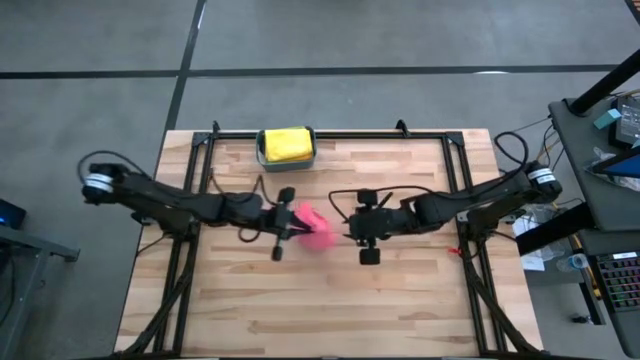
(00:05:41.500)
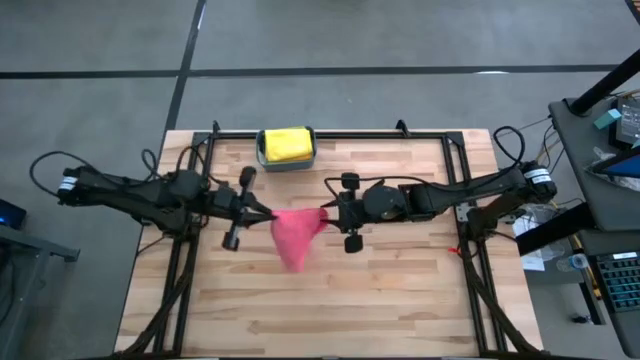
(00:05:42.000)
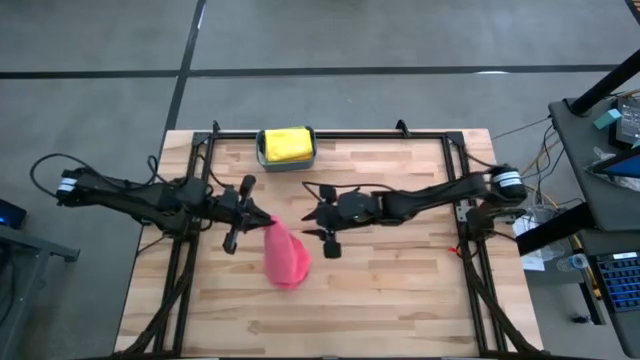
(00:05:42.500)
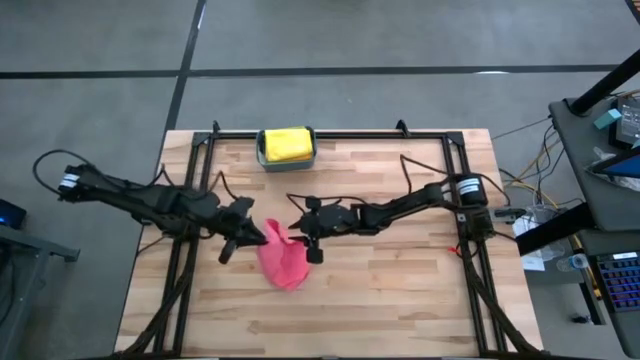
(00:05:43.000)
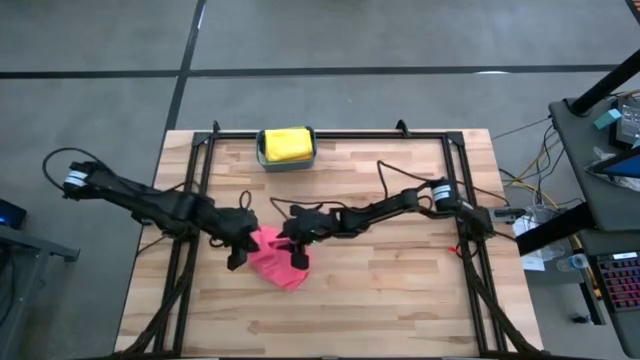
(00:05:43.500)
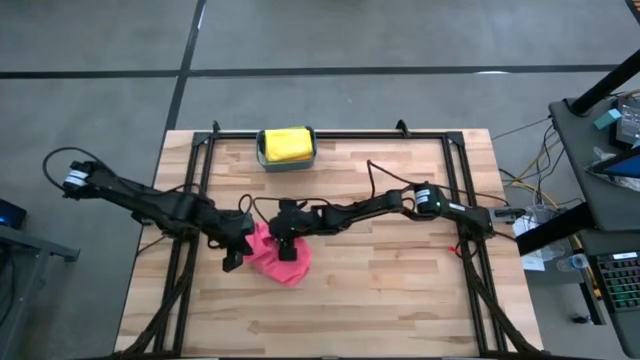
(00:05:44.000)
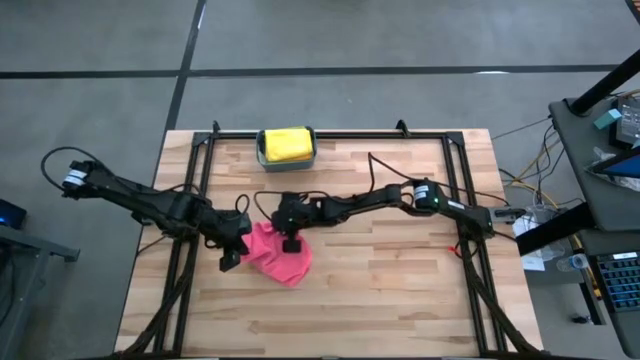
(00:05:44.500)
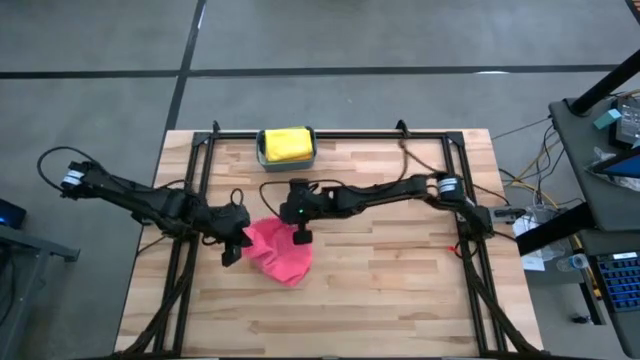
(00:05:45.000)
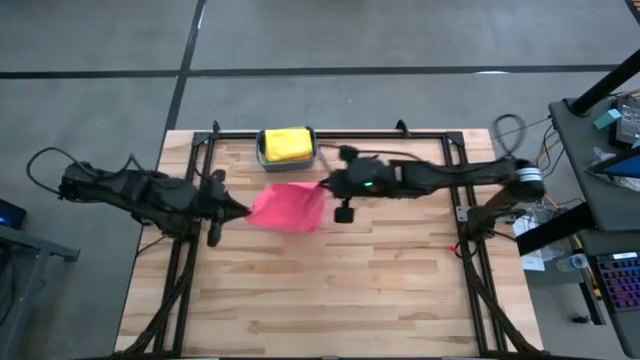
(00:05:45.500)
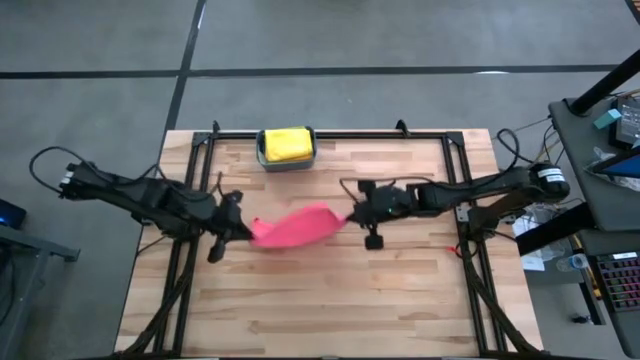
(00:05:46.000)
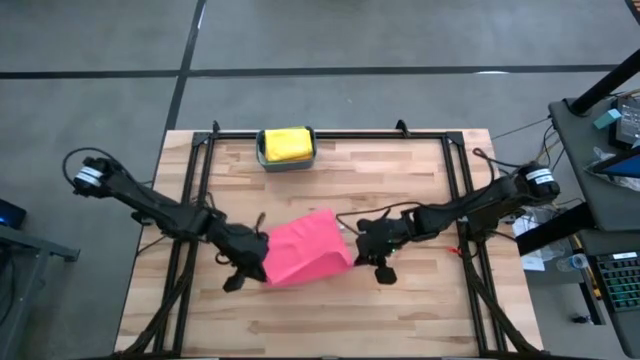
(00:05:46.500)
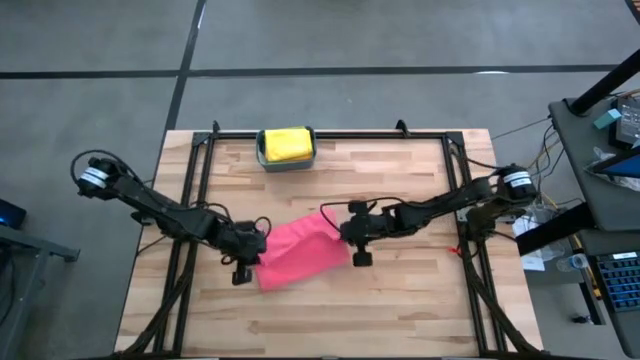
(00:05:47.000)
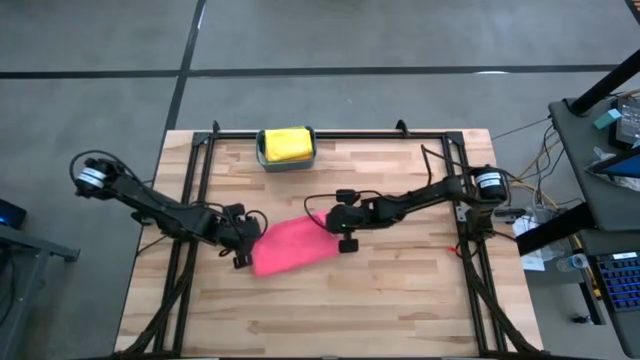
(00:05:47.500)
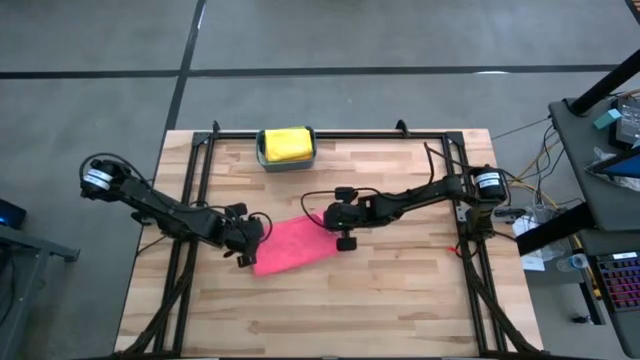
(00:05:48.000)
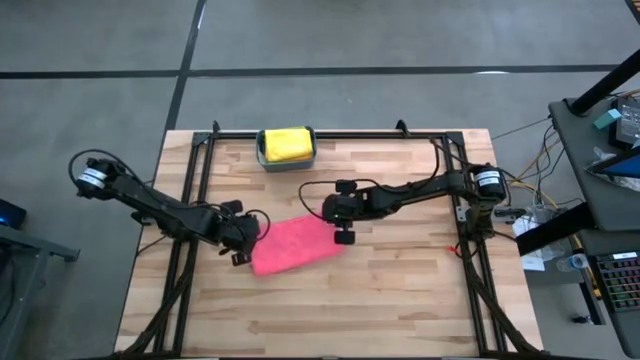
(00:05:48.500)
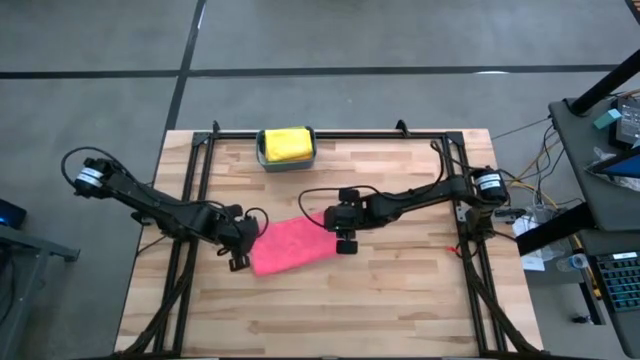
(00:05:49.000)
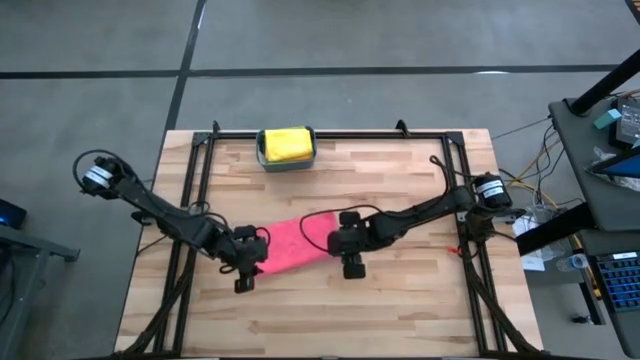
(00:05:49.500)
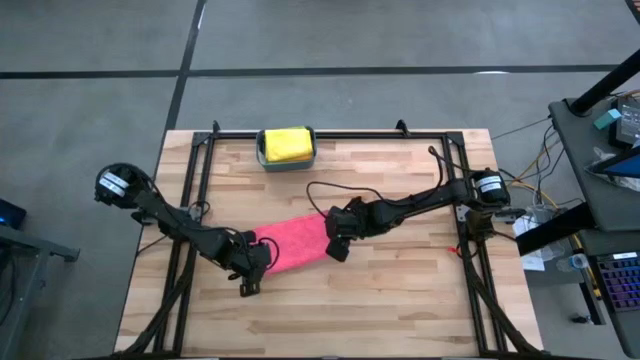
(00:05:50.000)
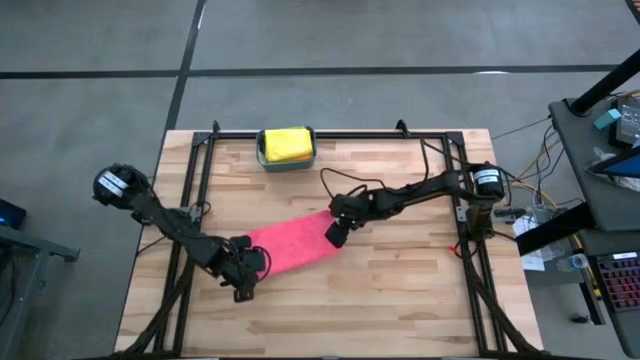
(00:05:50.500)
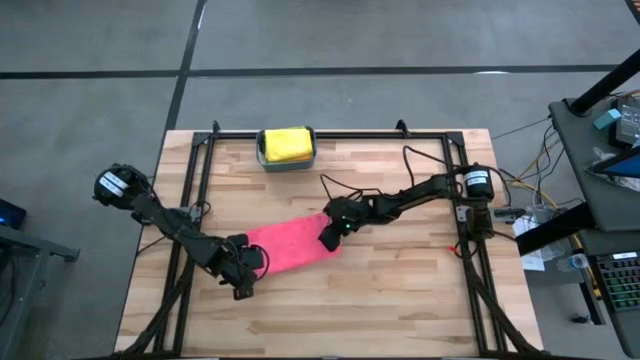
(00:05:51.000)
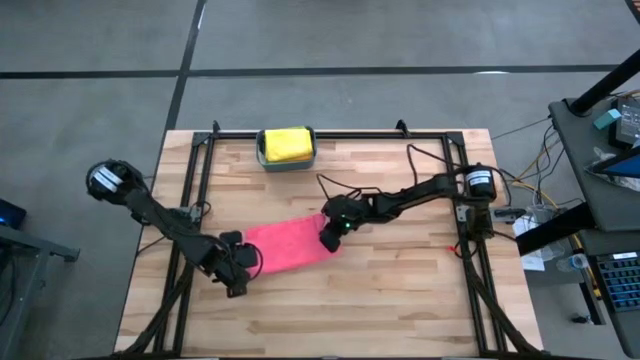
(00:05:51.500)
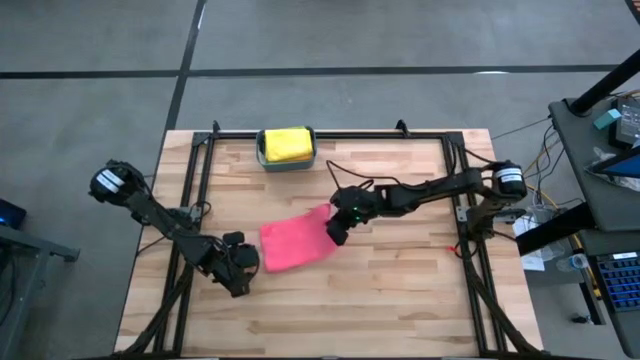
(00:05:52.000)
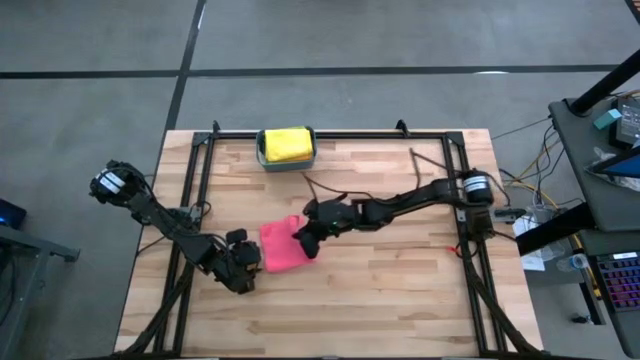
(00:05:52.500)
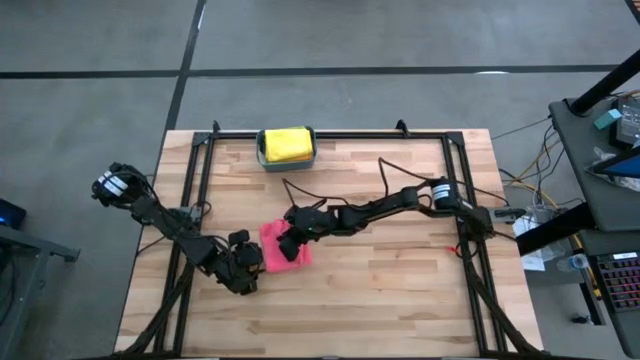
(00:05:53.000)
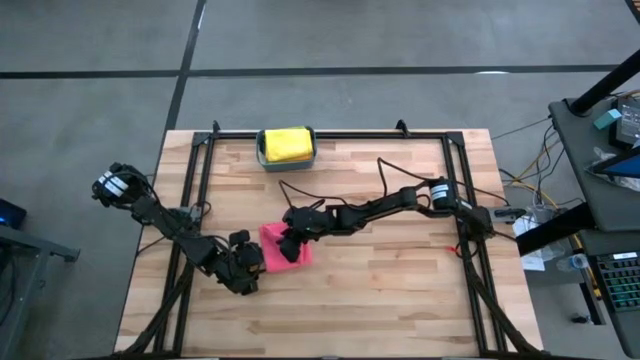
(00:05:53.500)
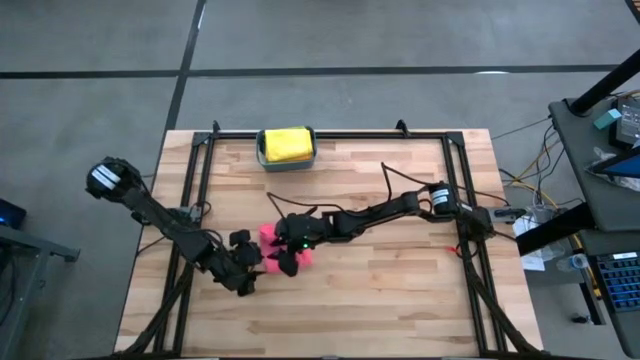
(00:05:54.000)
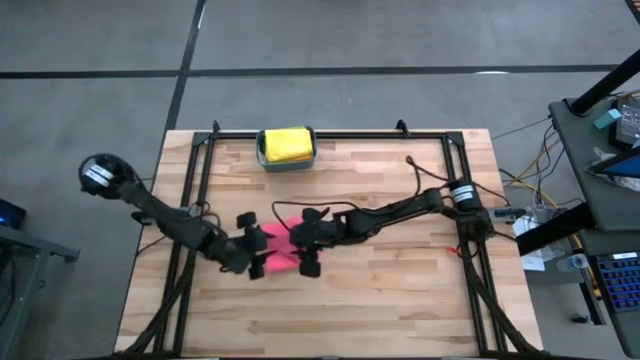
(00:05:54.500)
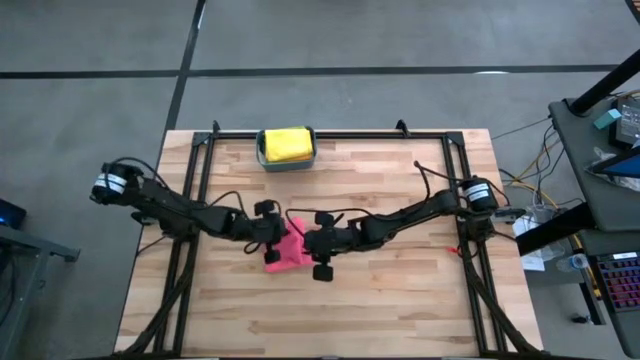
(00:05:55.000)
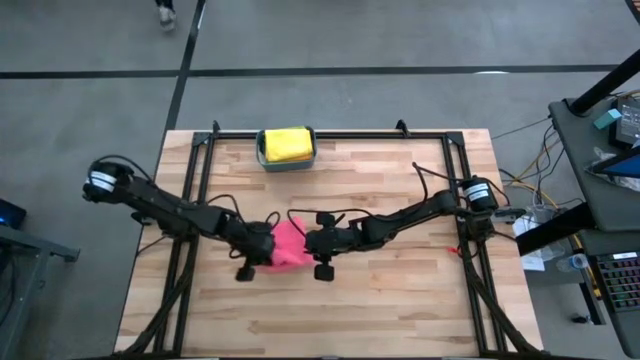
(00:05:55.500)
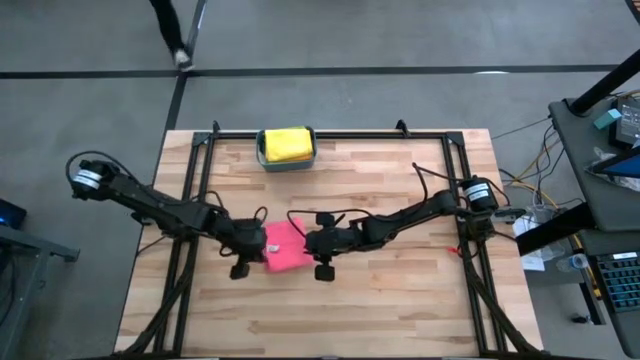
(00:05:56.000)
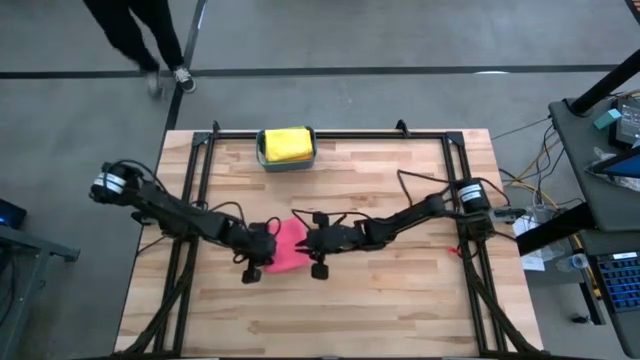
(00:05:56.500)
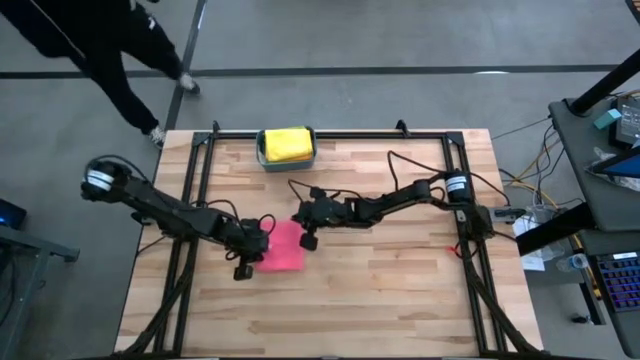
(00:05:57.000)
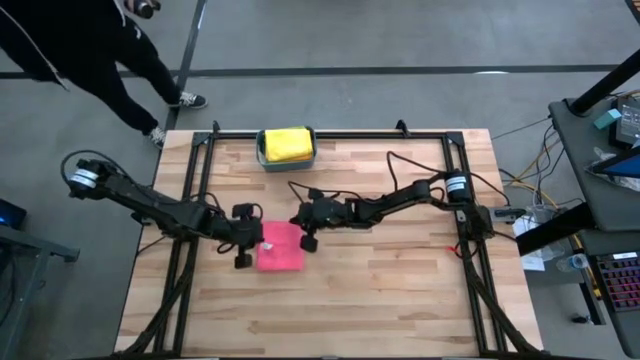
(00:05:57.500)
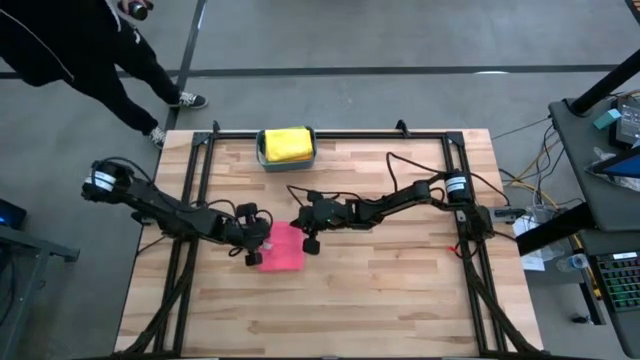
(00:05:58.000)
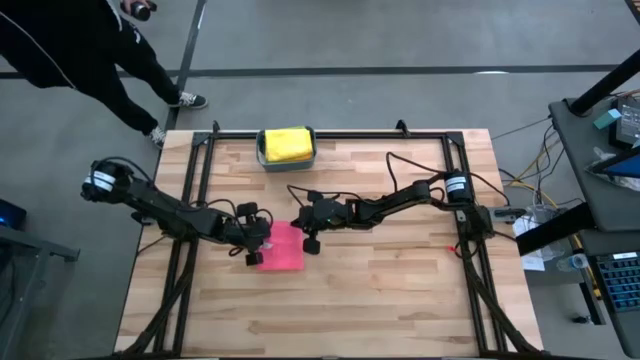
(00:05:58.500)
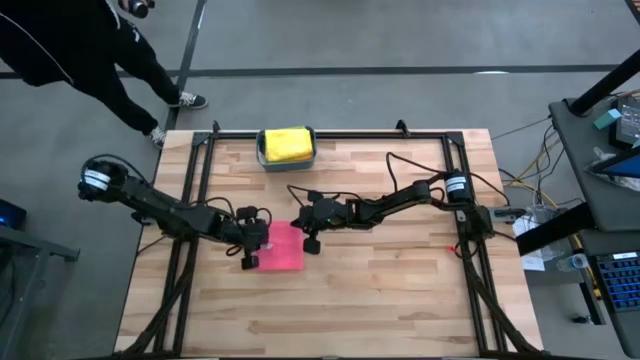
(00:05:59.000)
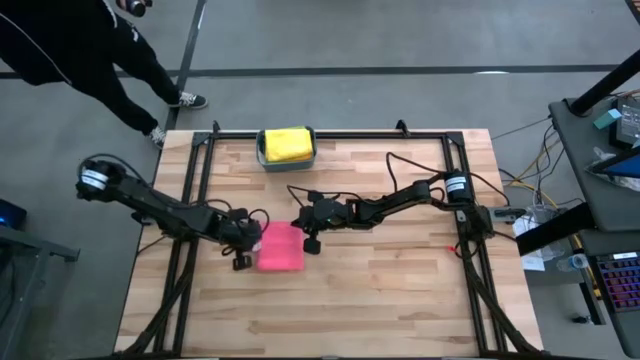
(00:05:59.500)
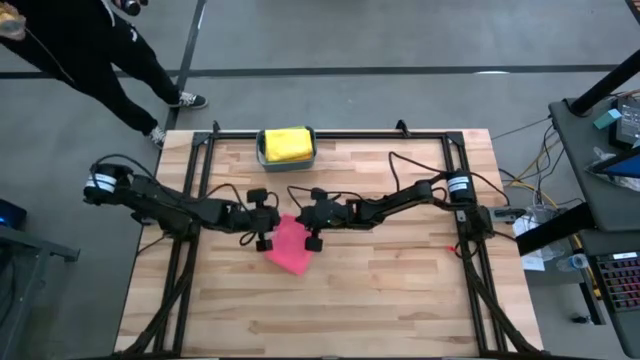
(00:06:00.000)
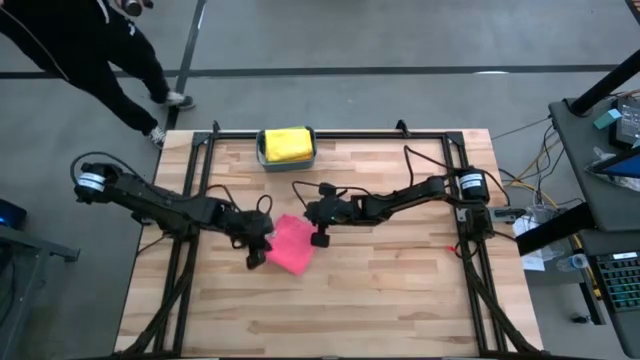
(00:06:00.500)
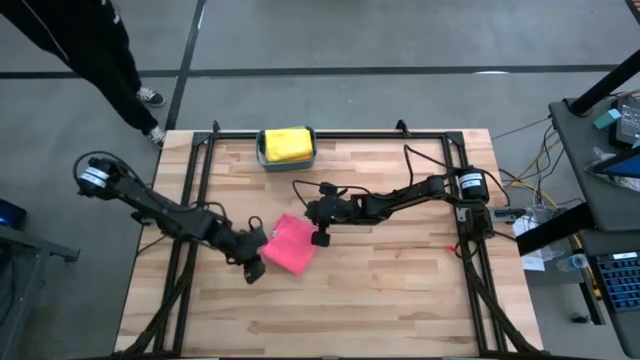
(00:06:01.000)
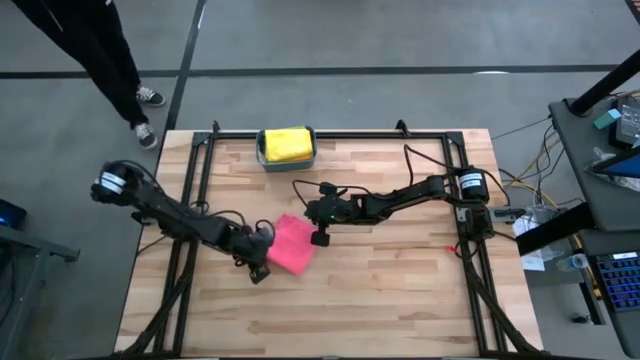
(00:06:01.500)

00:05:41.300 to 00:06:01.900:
Task: Fold microfiber towels
Fold the pink towel
